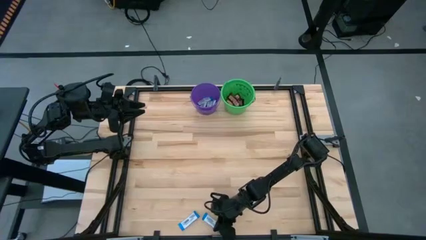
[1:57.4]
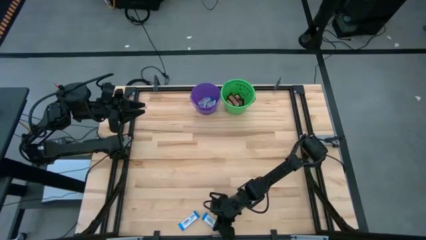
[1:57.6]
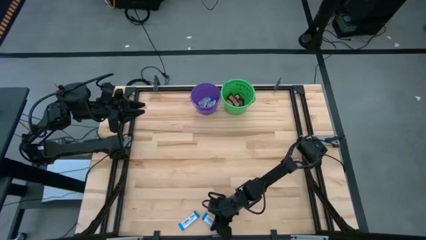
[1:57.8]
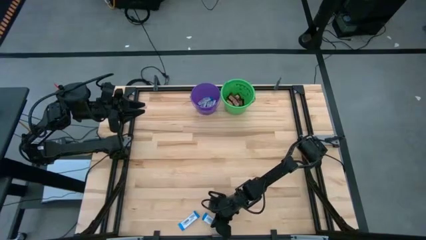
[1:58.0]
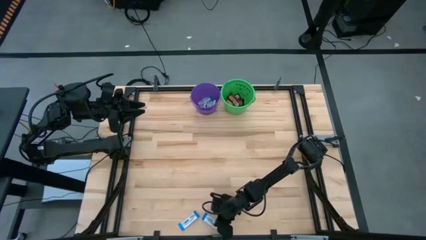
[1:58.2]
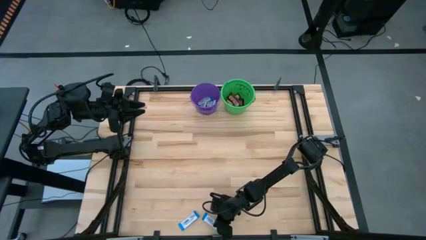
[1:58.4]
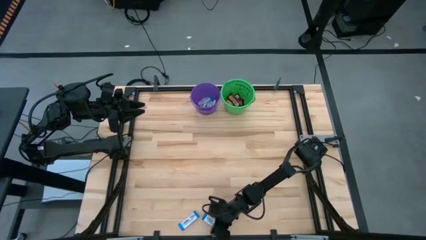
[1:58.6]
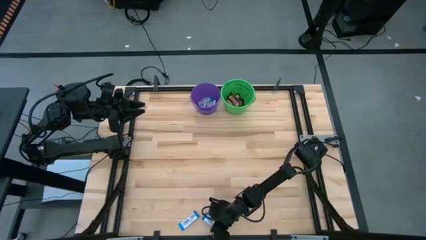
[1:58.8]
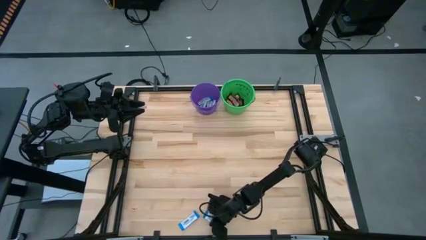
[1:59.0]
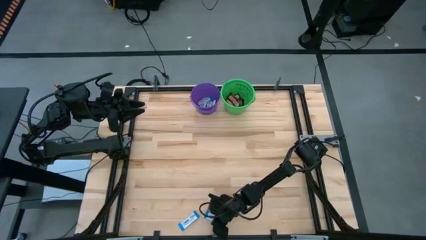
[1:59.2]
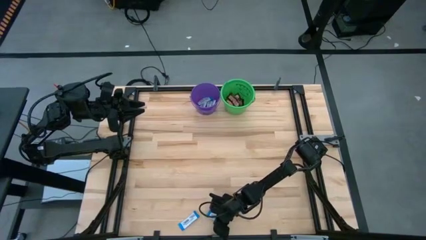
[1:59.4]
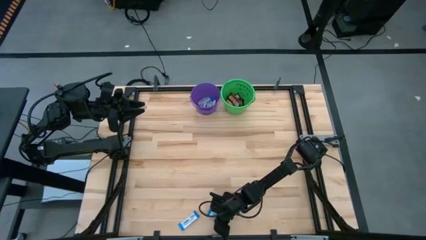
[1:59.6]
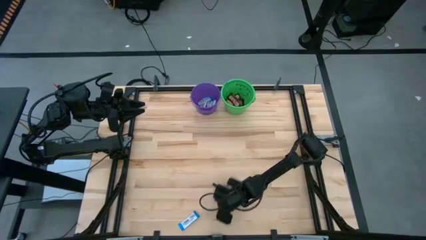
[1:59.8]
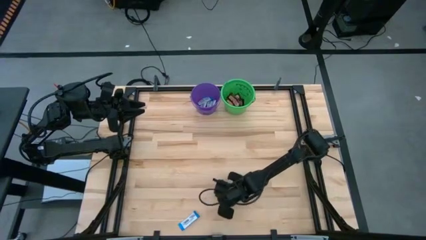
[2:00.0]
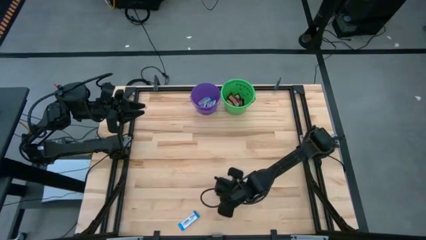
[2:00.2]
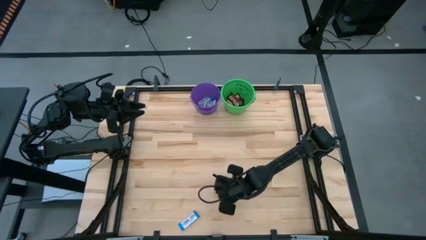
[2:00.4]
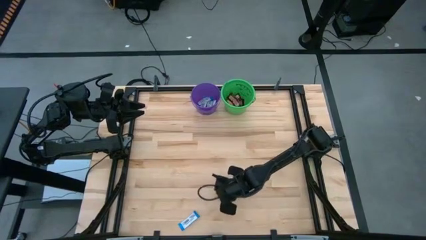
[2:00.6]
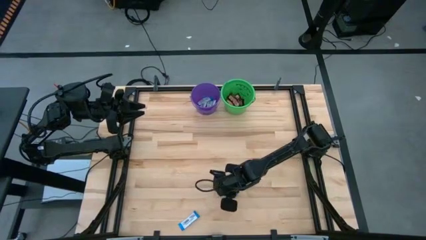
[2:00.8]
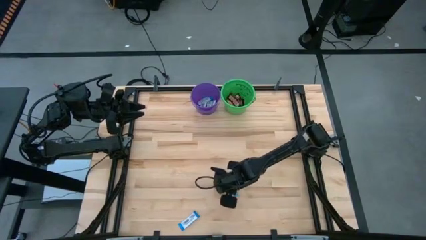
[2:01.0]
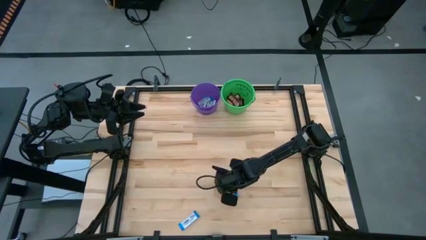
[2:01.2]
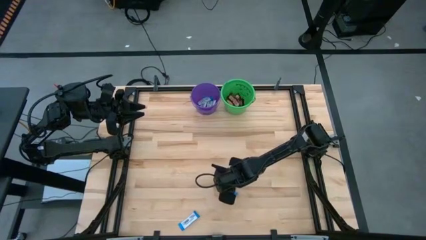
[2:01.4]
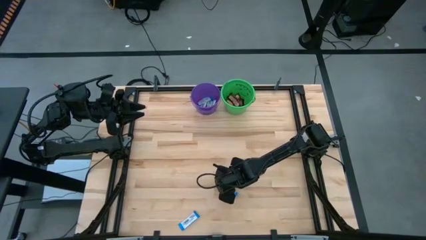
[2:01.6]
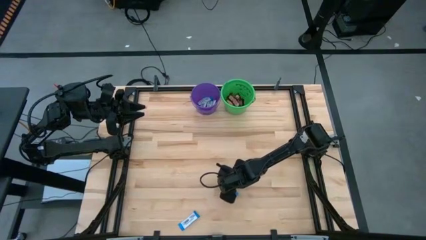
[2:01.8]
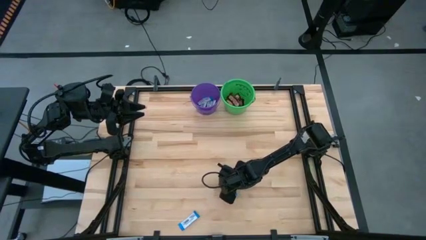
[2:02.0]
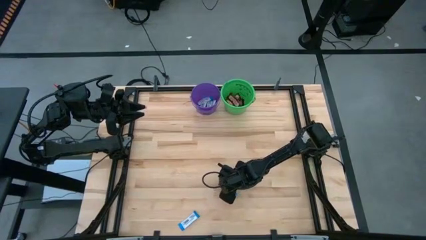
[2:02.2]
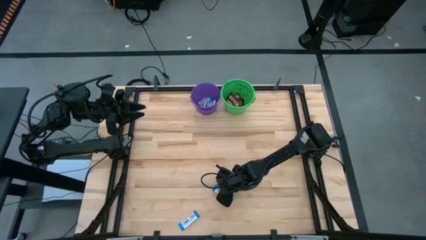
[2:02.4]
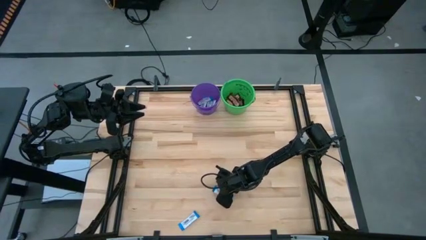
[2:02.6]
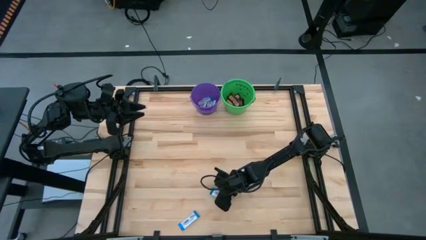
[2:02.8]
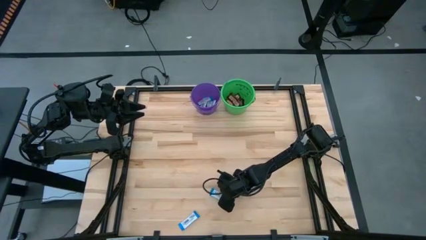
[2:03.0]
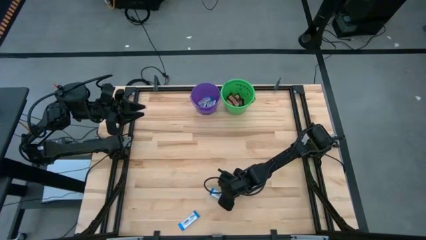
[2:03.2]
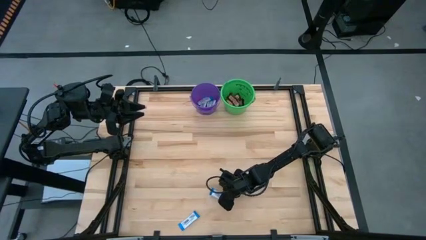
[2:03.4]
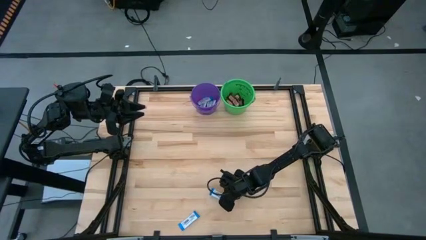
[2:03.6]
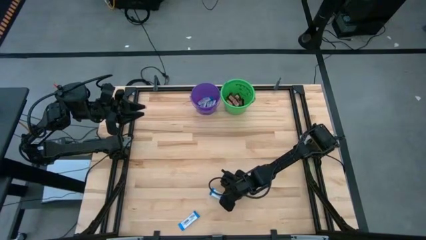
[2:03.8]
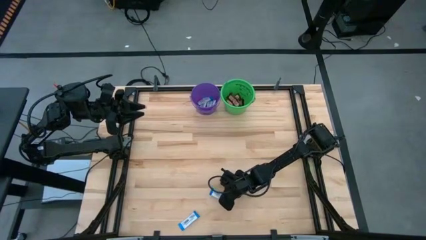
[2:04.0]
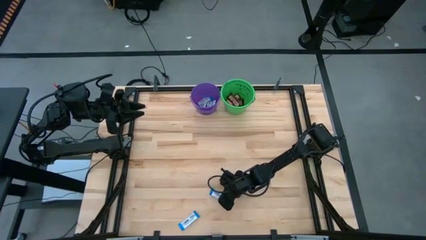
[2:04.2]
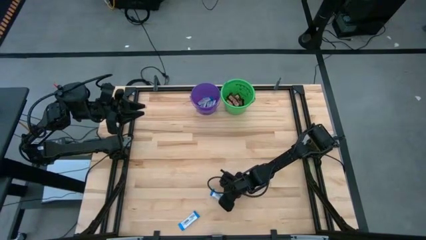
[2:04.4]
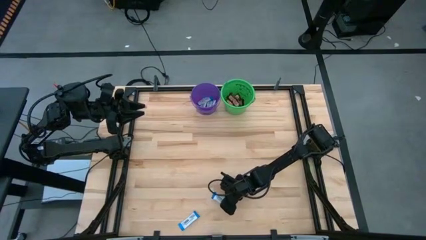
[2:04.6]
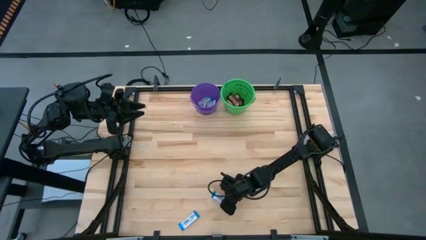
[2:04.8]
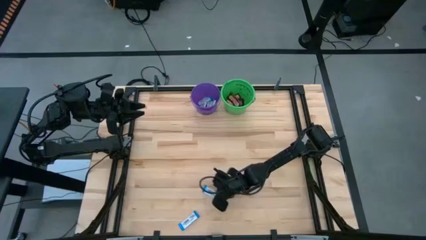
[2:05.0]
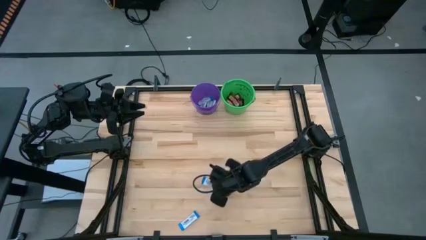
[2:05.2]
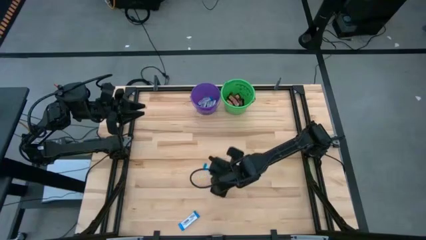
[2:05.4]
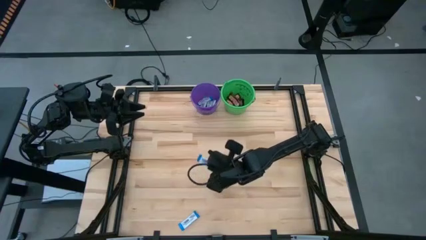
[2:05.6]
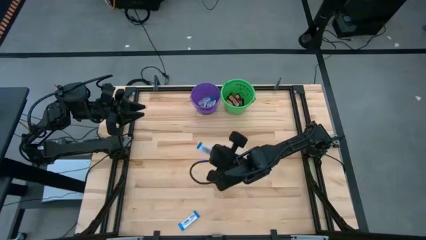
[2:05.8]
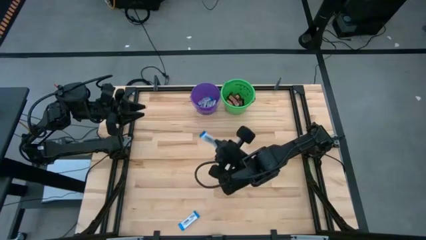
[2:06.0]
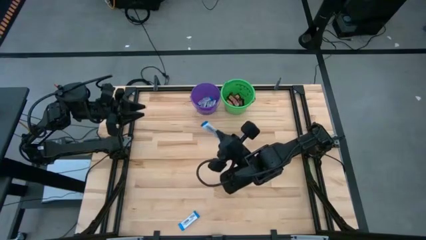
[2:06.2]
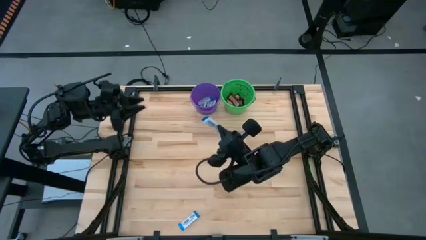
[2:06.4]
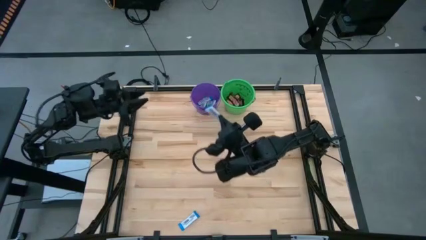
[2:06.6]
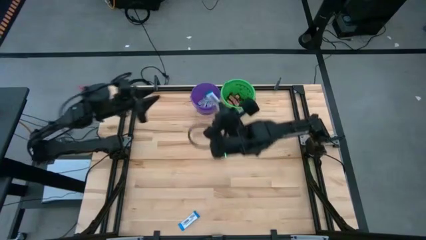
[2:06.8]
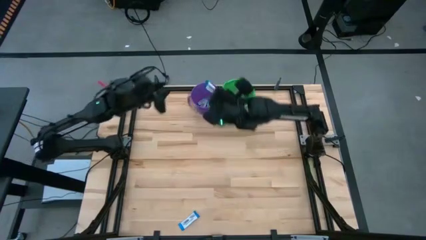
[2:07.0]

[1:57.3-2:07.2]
Task: Sort candy by brand, put in halloween buckets
Put the white chocolate bar into the purple bucket

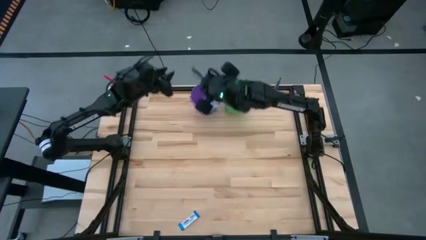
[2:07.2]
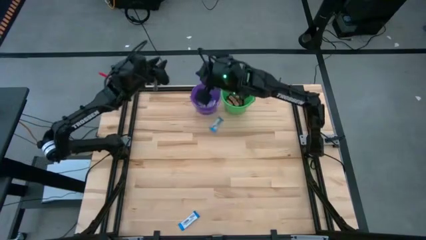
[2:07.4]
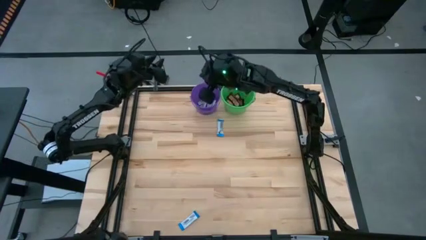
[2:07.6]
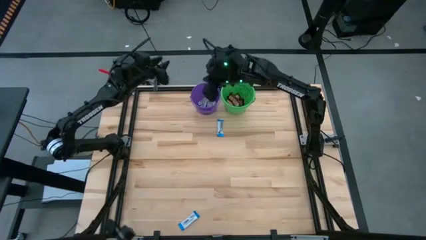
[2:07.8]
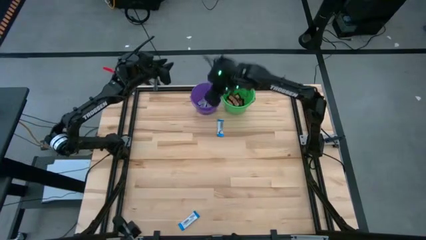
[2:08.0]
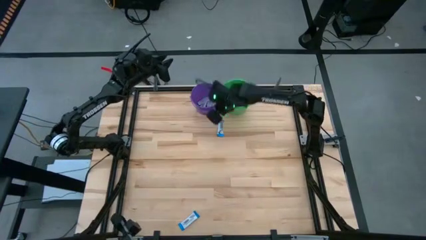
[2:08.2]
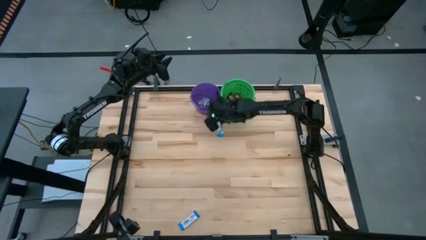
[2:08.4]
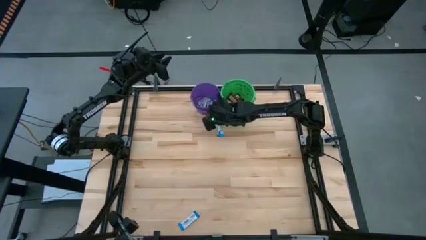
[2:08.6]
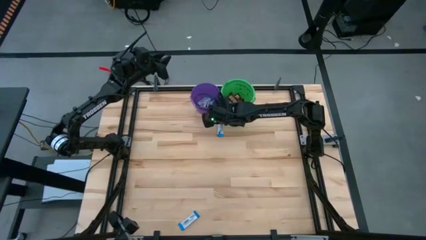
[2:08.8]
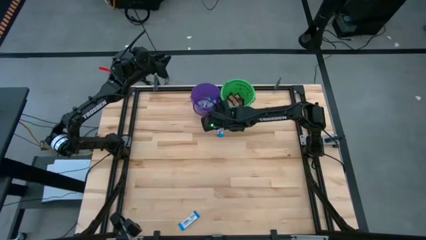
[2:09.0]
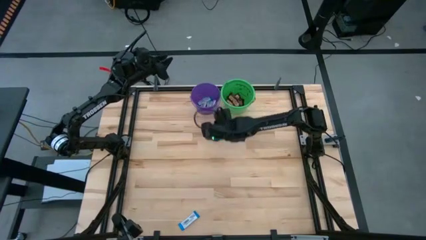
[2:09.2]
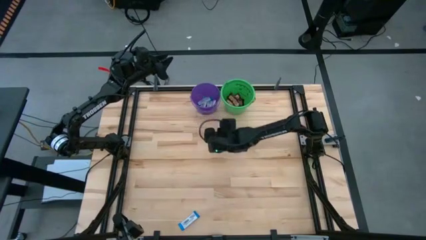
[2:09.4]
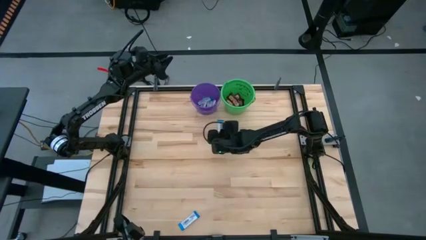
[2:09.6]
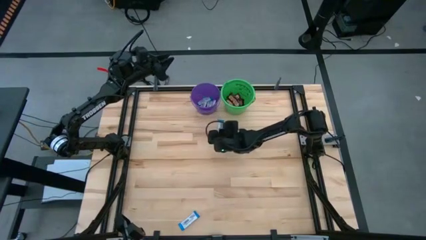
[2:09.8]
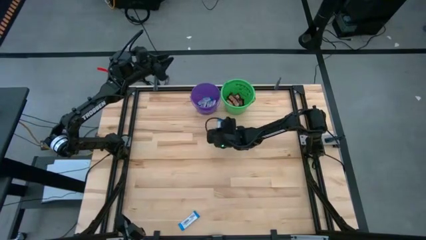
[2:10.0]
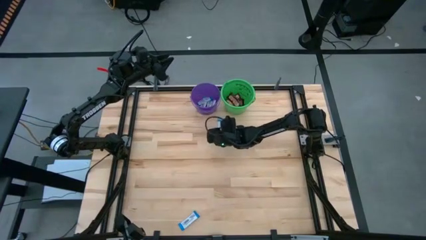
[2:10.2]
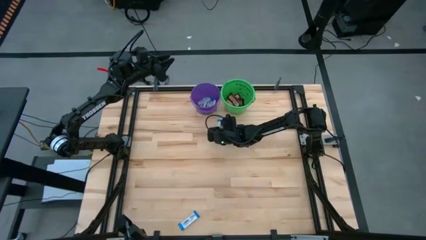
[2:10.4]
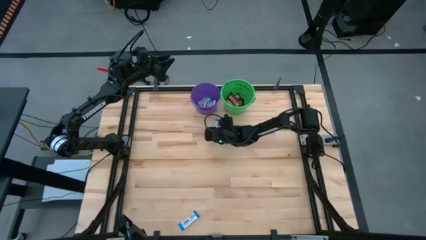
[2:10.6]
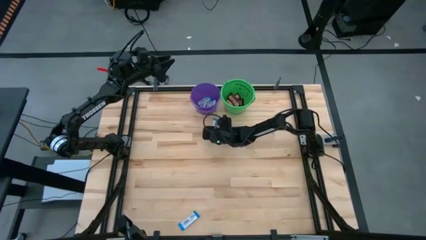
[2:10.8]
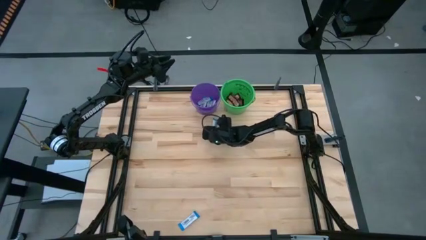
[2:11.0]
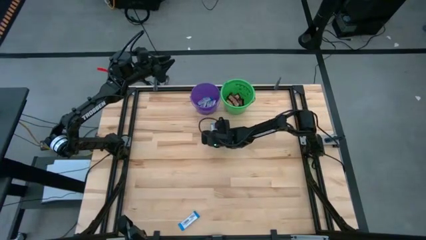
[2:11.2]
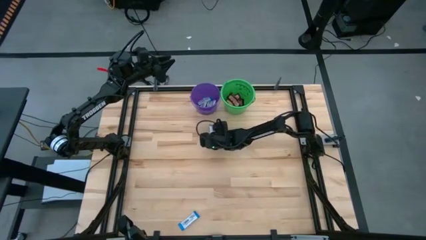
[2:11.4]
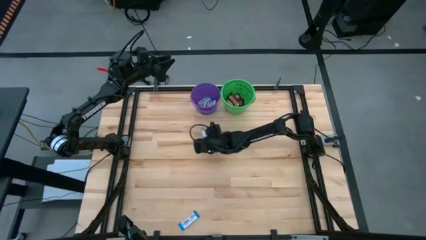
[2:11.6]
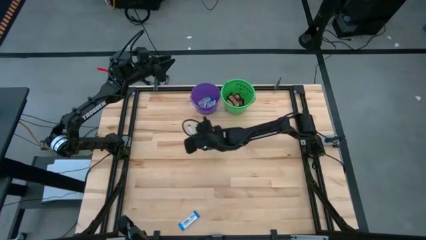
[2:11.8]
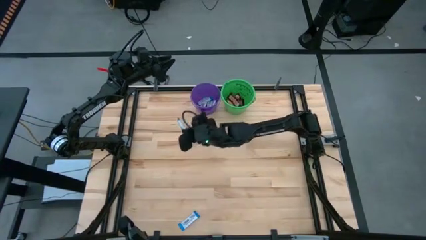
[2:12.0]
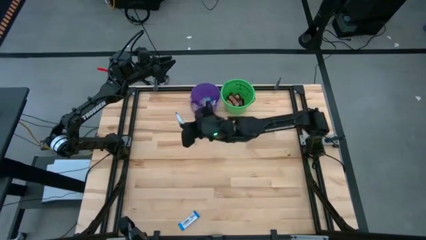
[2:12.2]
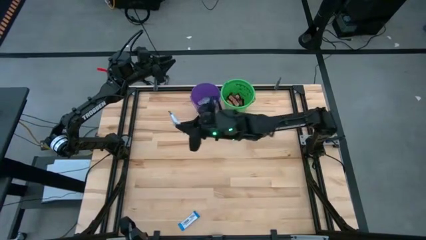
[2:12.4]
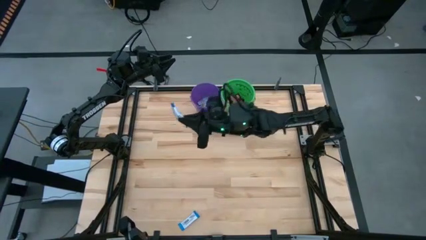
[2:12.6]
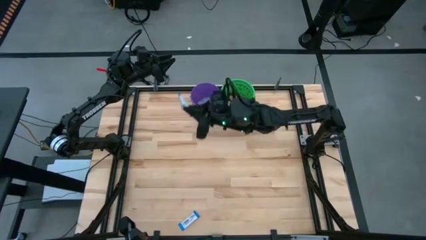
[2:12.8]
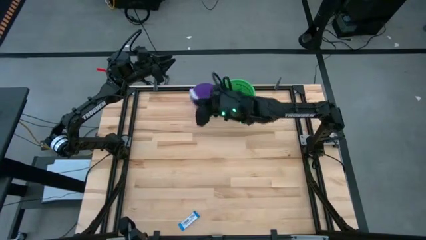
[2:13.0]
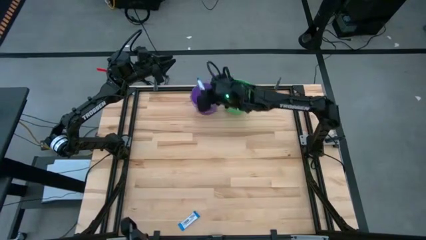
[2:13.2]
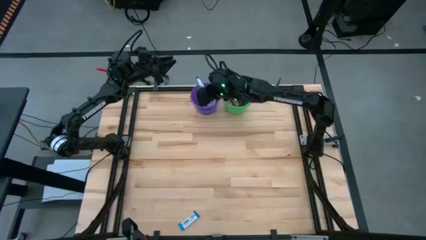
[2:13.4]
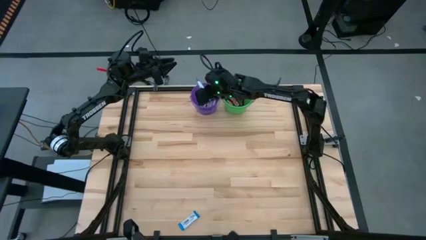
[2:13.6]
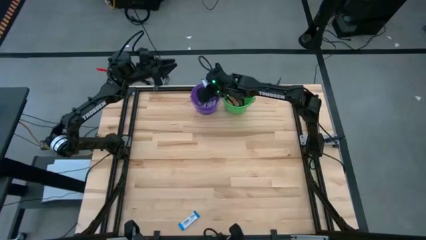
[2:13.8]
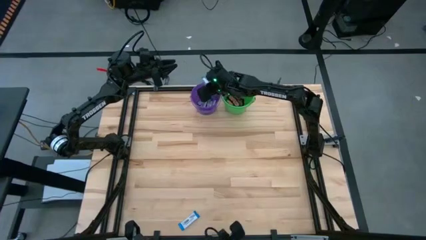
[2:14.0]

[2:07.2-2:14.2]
Put the white chocolate bar into the purple bucket
